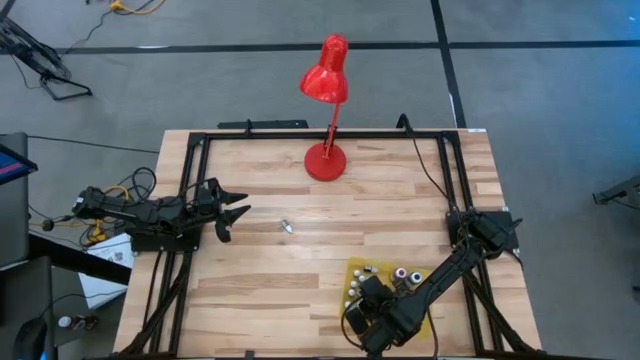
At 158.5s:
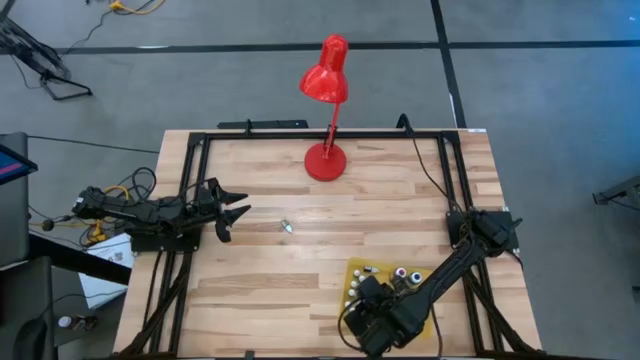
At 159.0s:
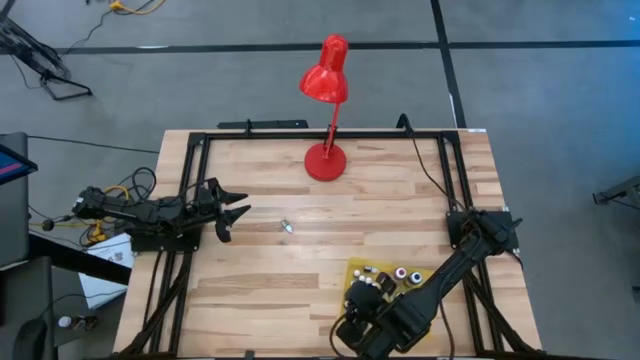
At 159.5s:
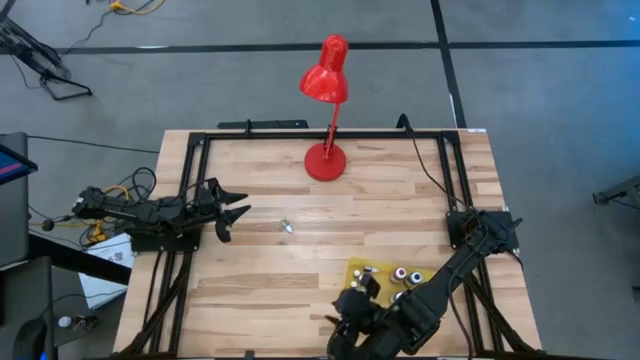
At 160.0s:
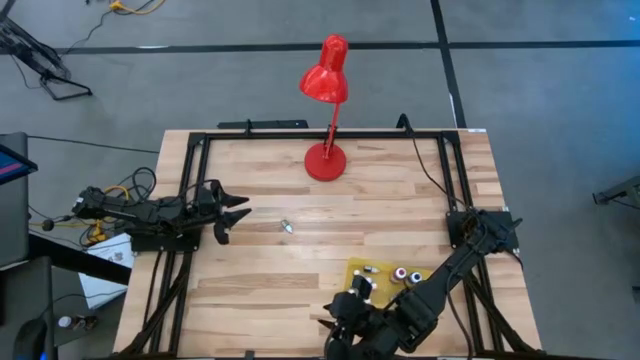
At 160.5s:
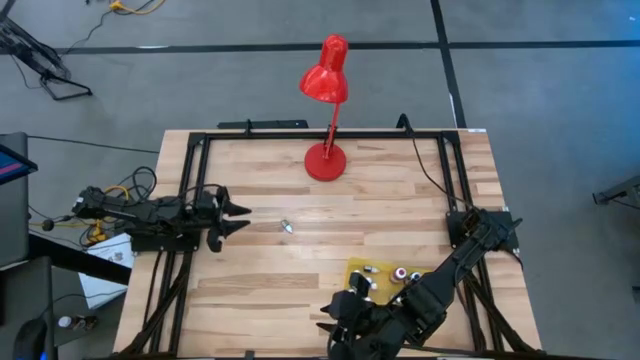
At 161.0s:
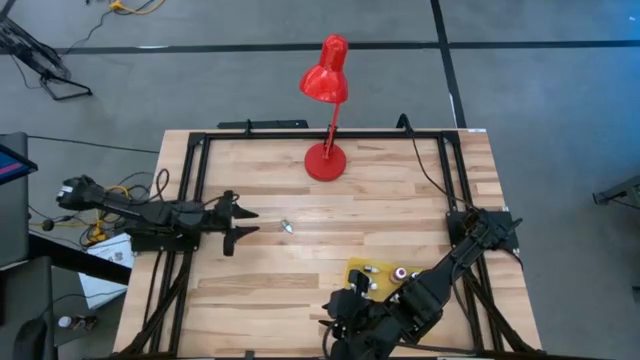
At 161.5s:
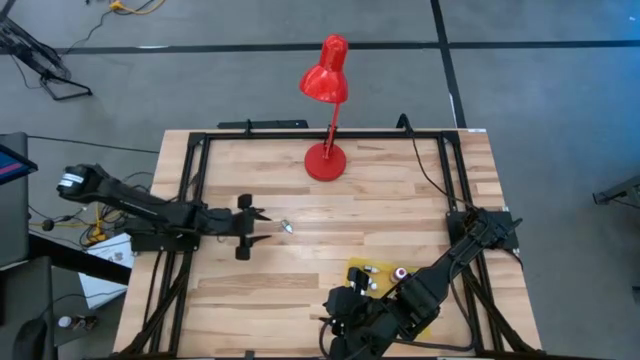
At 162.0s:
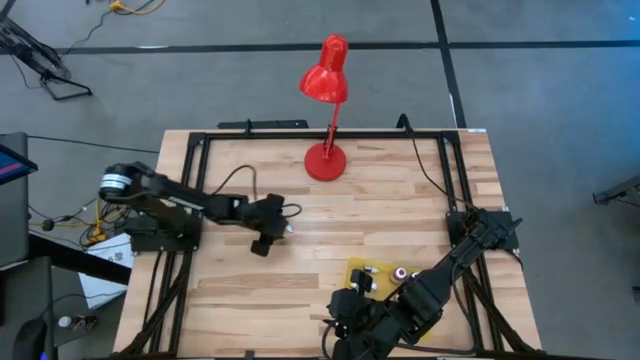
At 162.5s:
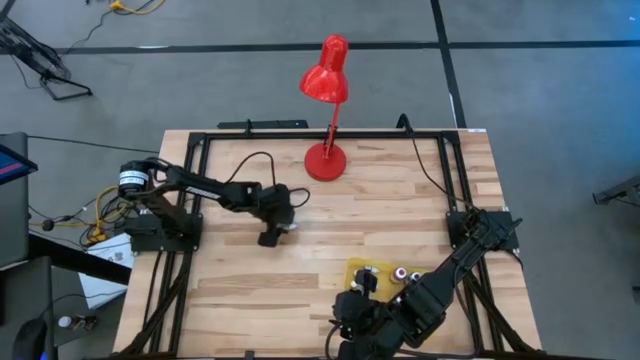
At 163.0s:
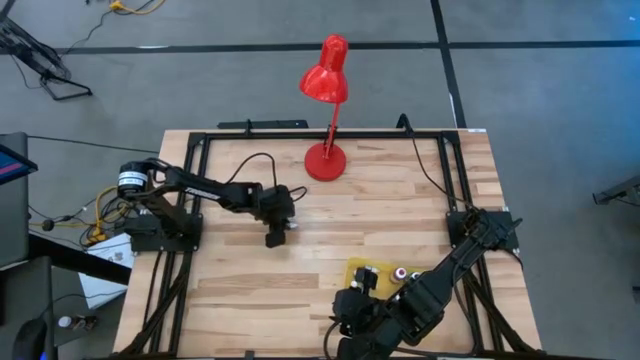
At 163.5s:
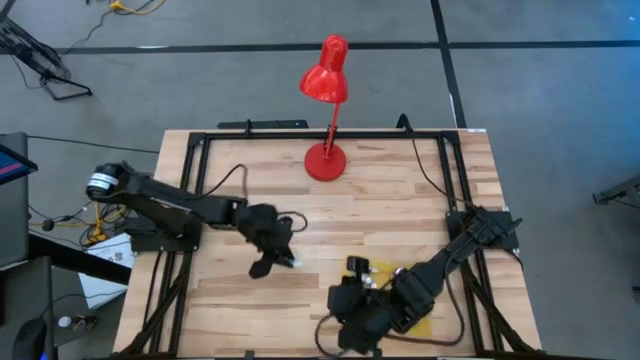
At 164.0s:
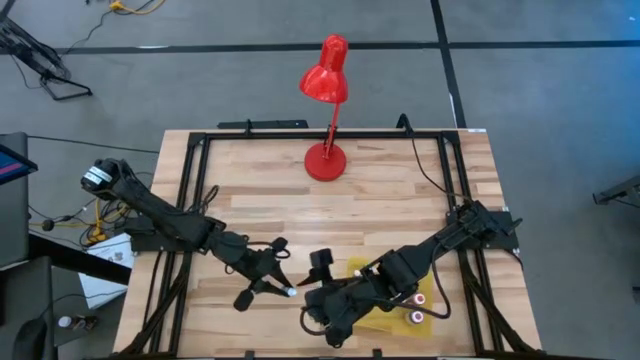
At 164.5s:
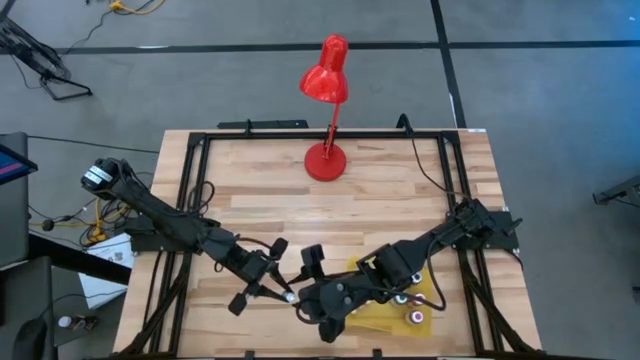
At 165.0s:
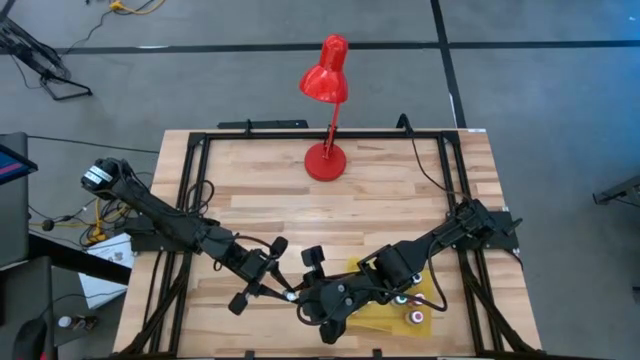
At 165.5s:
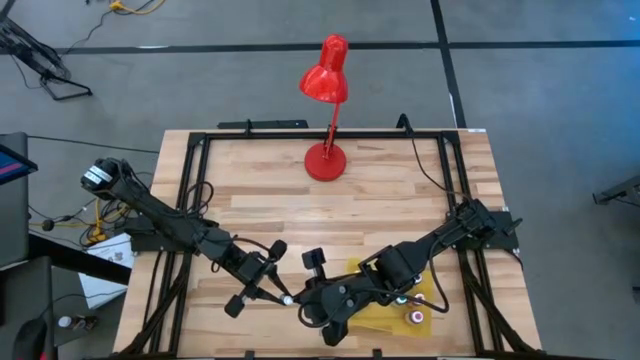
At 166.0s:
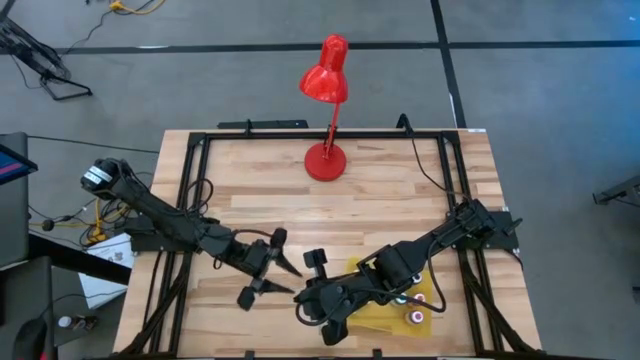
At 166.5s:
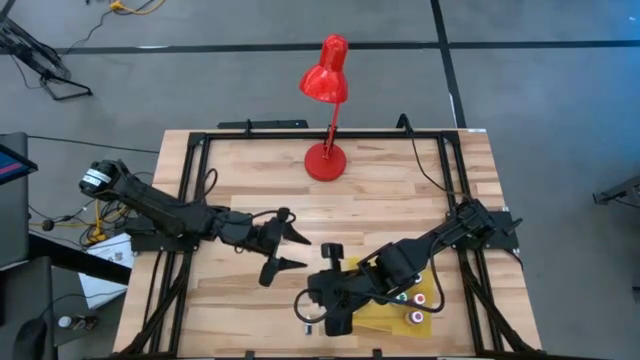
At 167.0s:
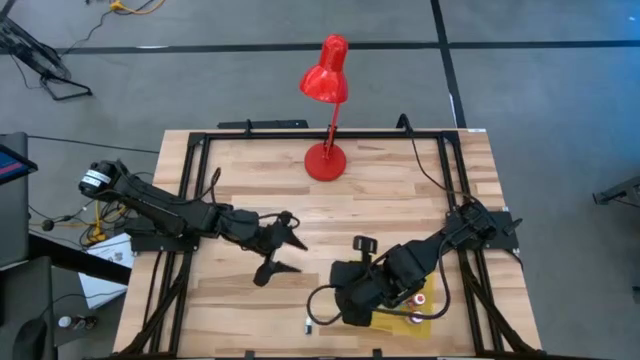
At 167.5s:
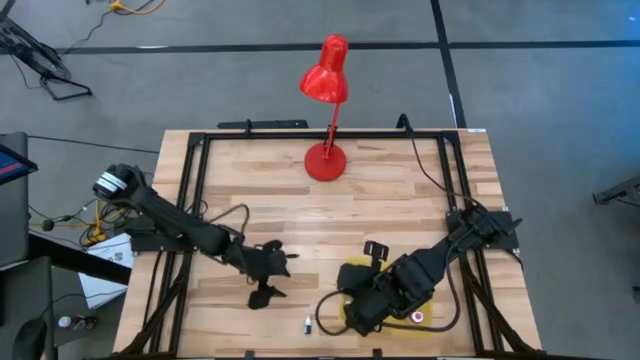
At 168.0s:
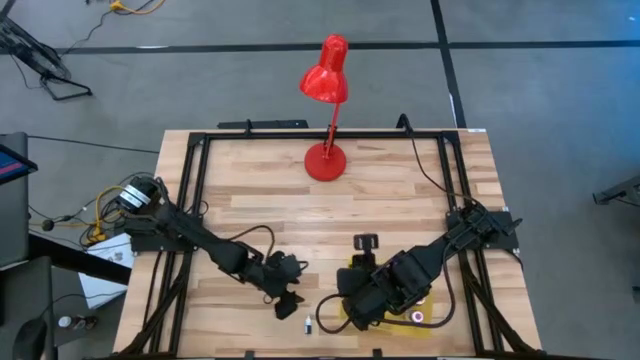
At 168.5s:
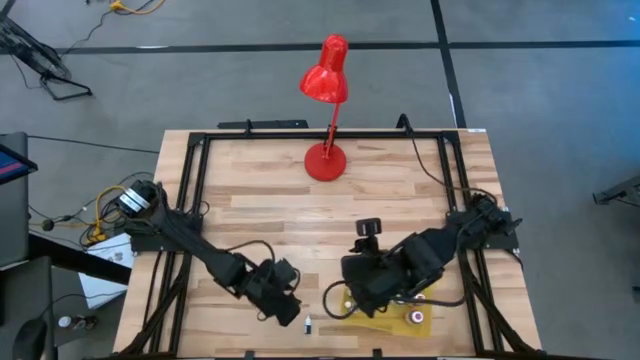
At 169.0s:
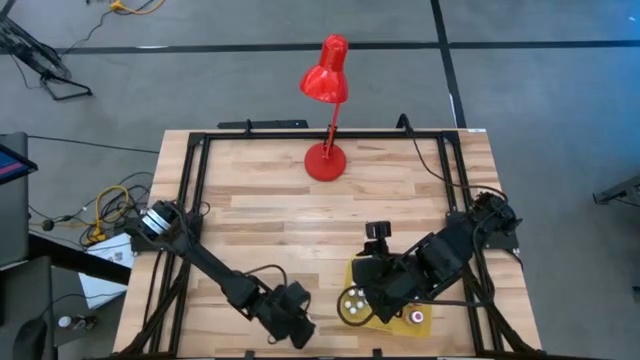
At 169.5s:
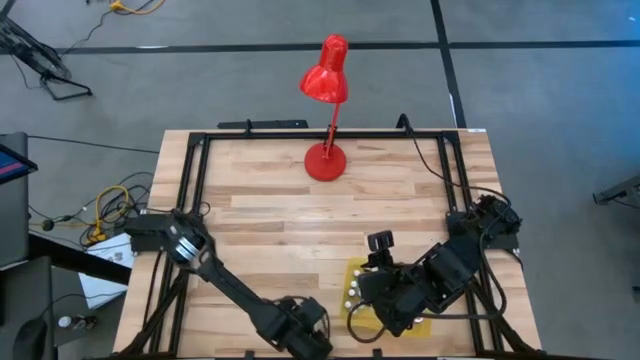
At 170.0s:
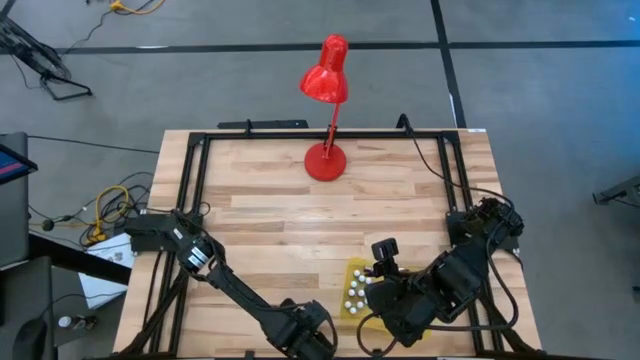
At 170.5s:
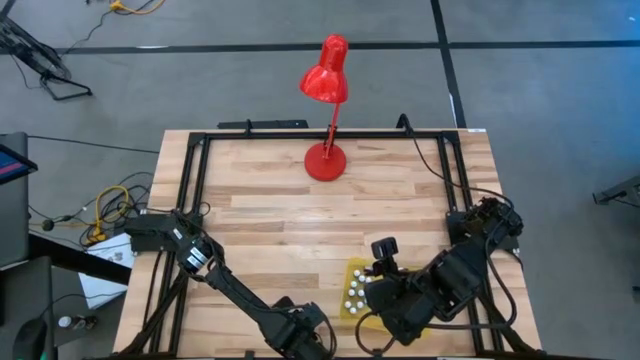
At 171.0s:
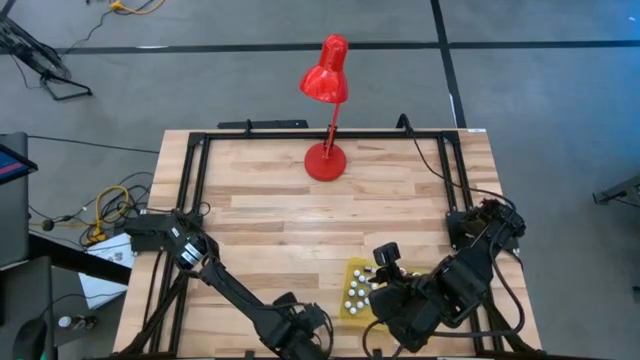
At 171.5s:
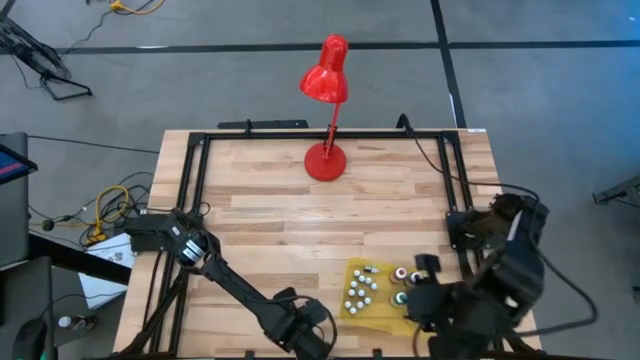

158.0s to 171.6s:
Task: Pick & Place food coloring
Put the green food coloring into the yellow bin

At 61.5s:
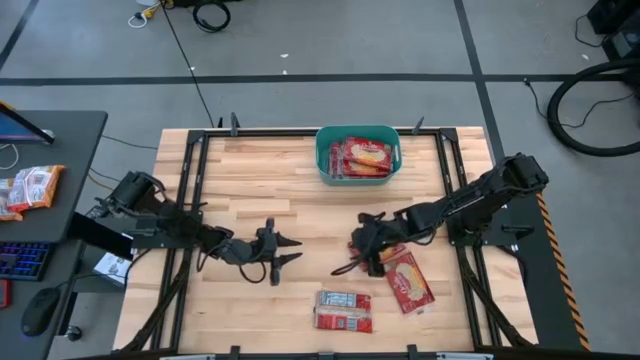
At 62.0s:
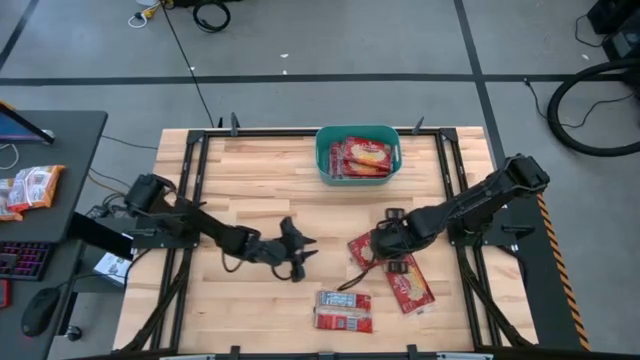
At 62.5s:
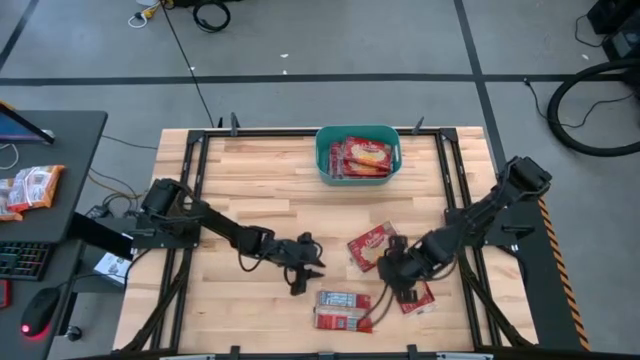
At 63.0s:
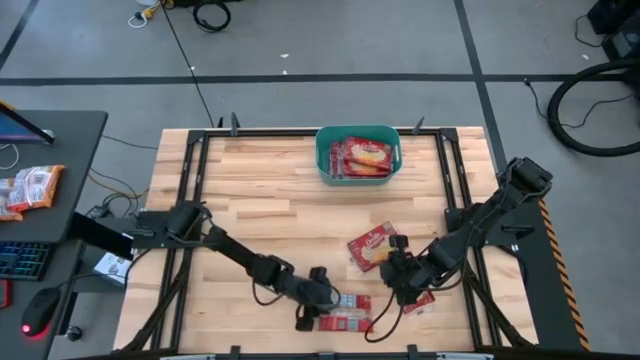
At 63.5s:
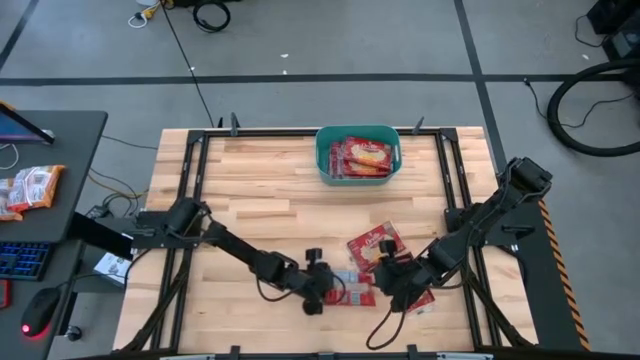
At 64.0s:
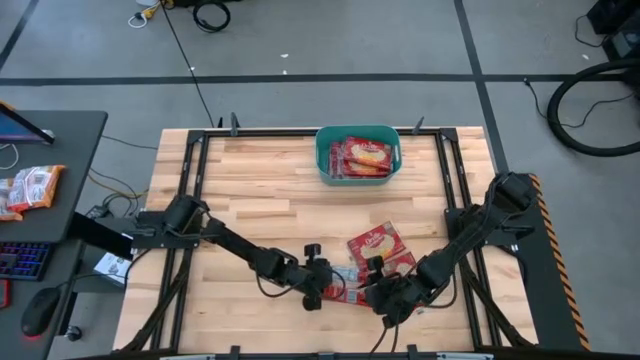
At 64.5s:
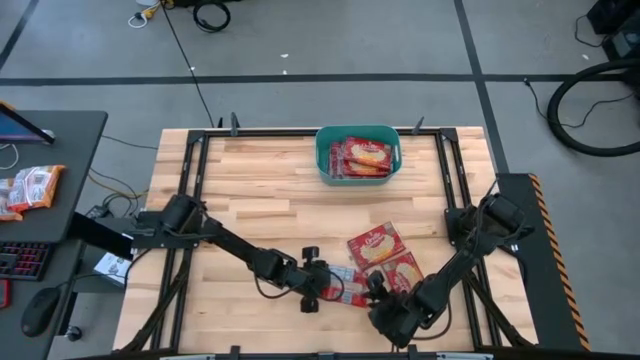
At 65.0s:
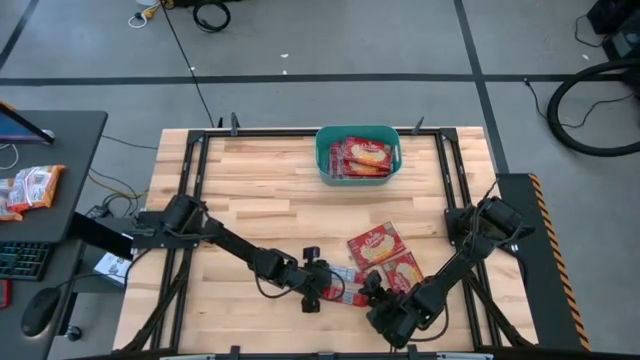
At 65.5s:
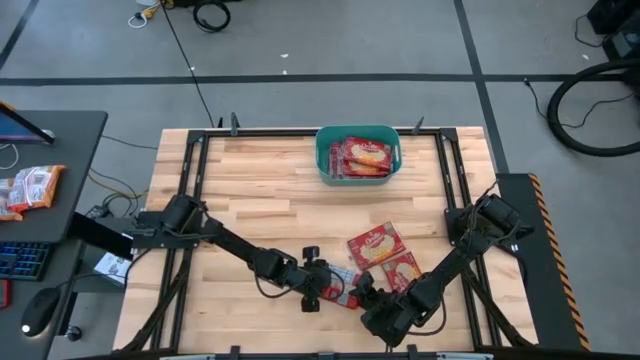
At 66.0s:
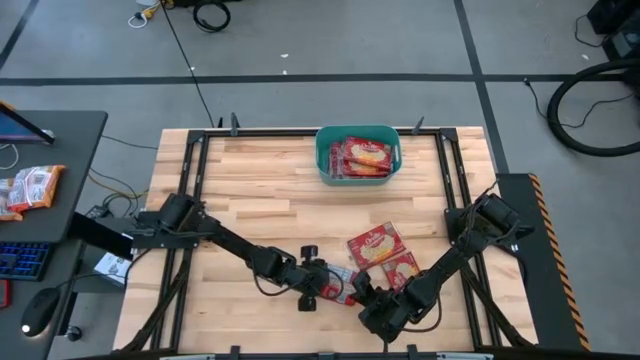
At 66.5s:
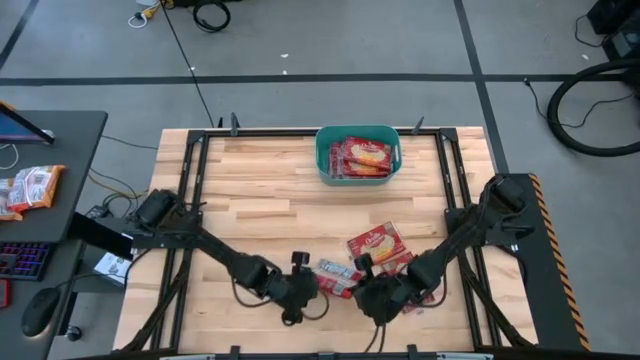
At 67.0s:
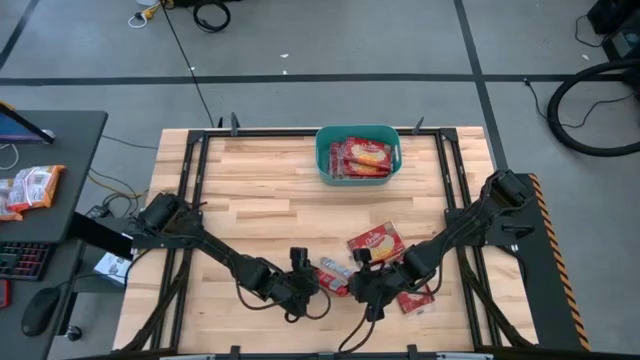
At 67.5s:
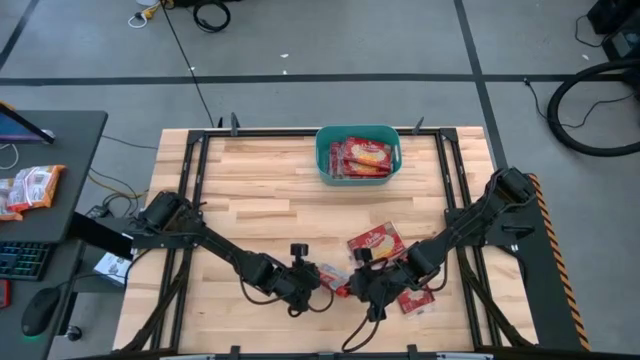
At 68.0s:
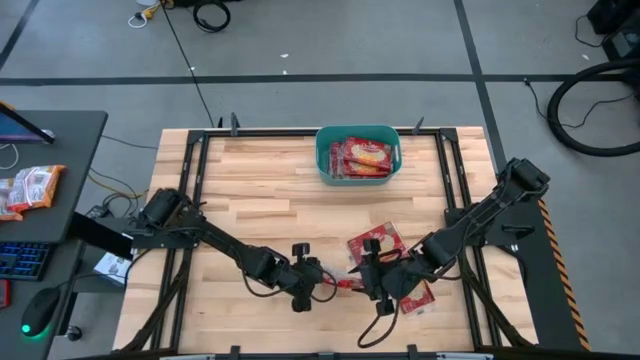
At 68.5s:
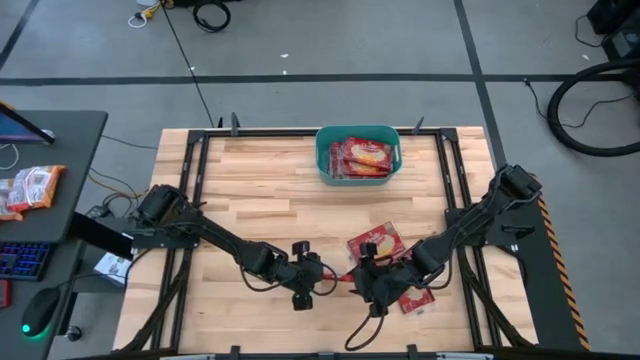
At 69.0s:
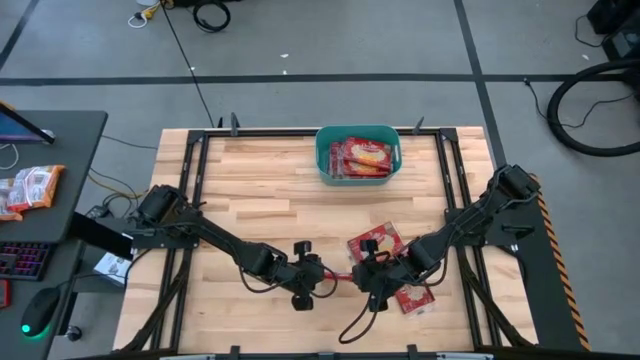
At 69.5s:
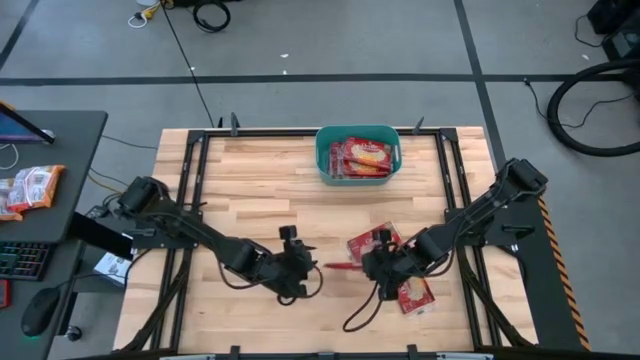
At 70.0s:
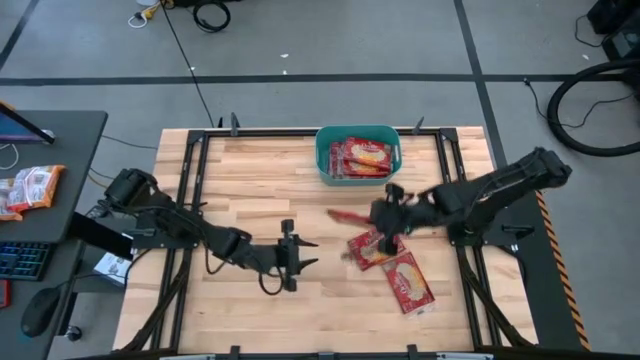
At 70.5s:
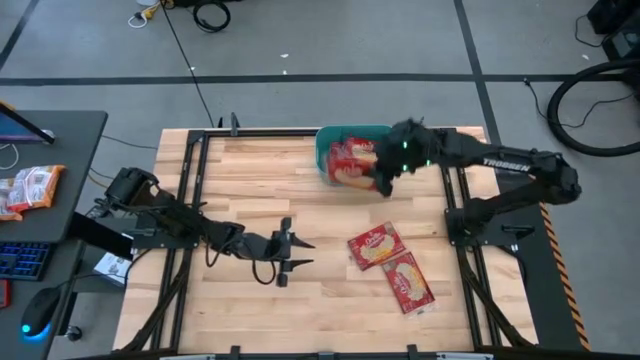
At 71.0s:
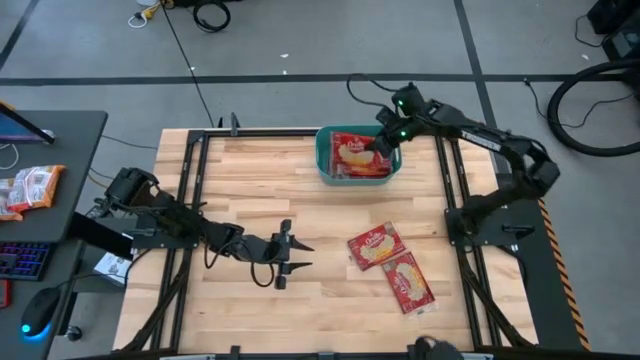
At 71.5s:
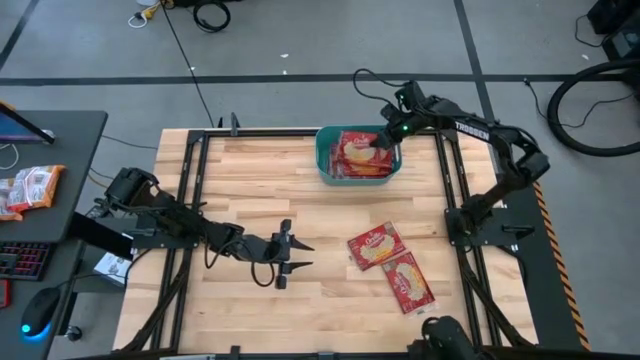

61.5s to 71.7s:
Task: Sort popcorn bags into baskets
Put the red popcorn bag into the blue bin
